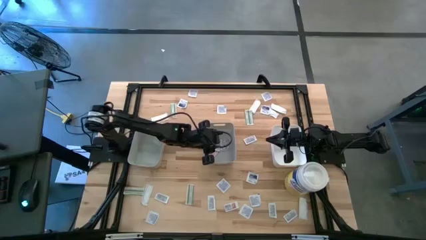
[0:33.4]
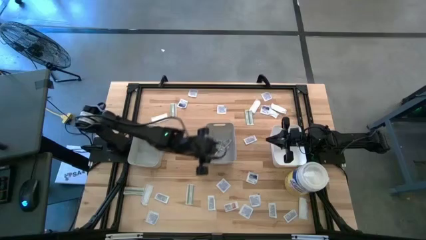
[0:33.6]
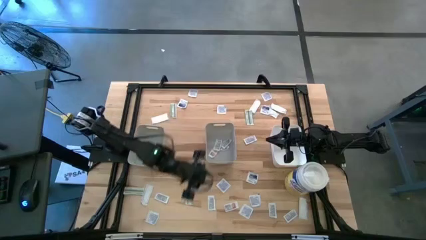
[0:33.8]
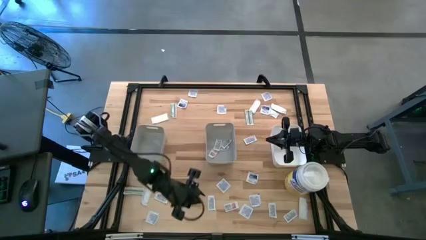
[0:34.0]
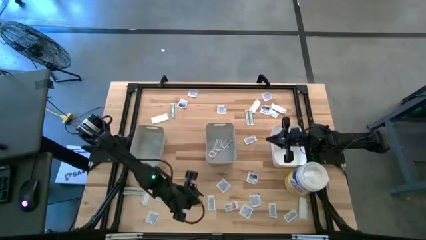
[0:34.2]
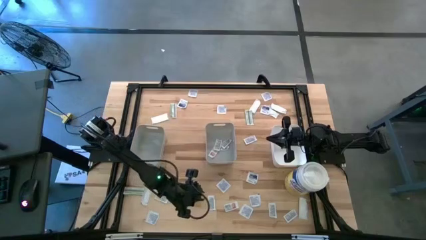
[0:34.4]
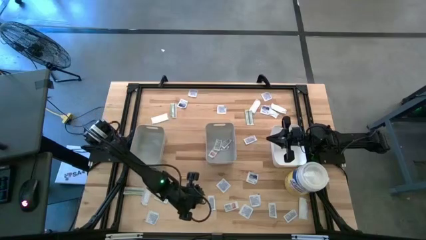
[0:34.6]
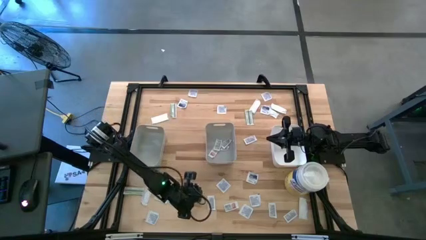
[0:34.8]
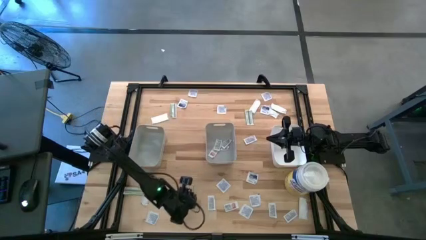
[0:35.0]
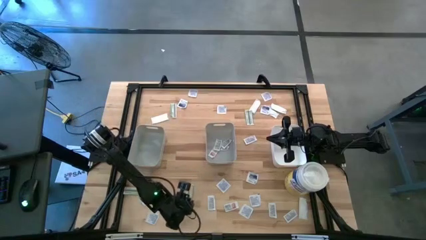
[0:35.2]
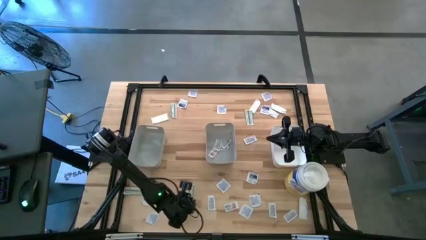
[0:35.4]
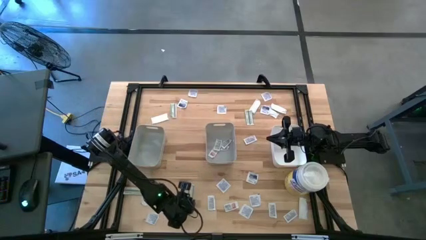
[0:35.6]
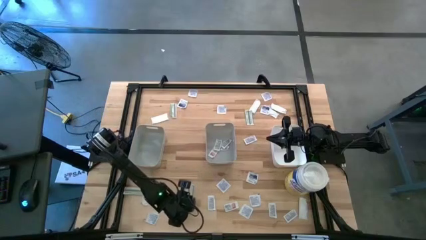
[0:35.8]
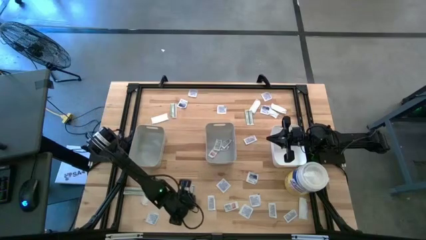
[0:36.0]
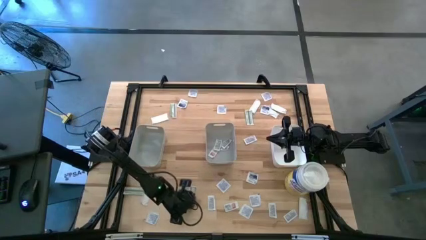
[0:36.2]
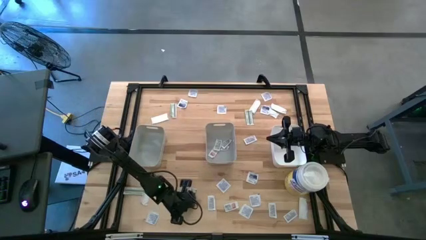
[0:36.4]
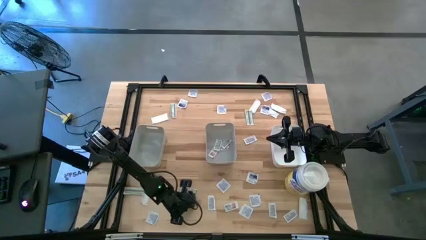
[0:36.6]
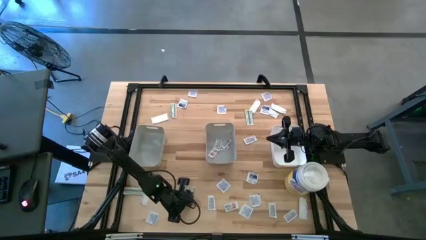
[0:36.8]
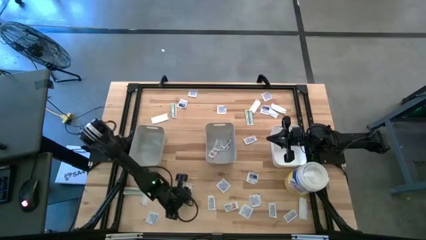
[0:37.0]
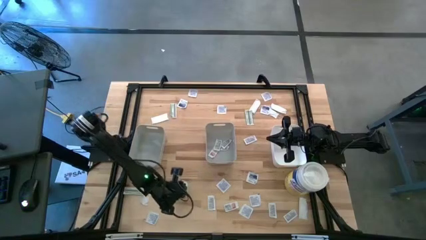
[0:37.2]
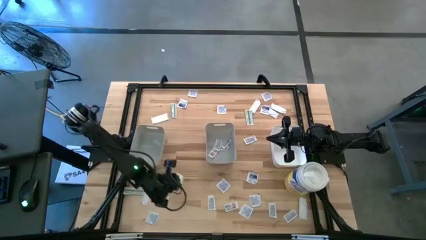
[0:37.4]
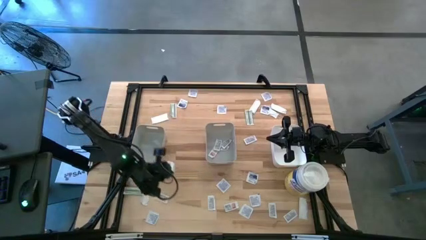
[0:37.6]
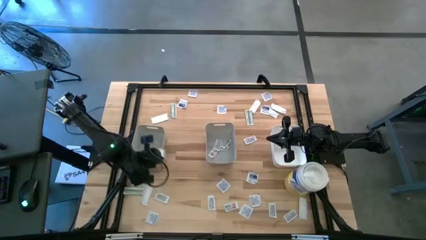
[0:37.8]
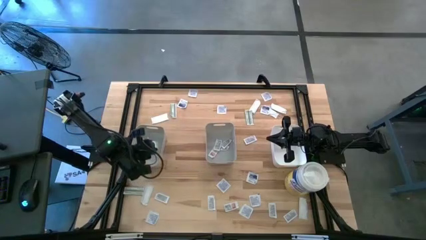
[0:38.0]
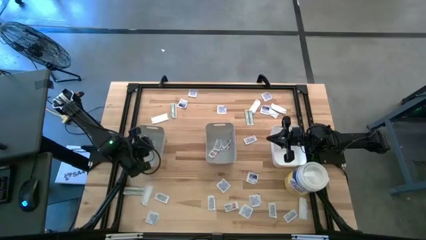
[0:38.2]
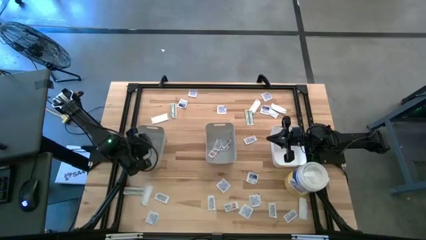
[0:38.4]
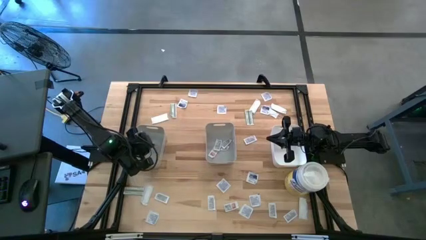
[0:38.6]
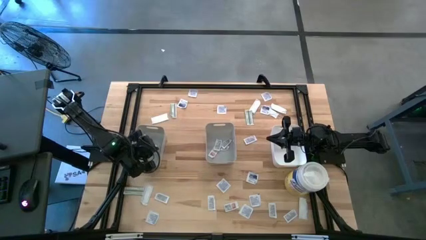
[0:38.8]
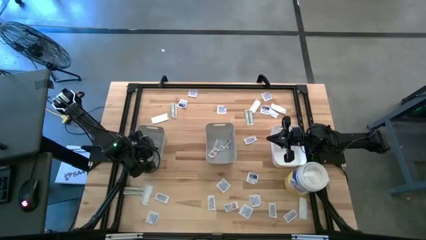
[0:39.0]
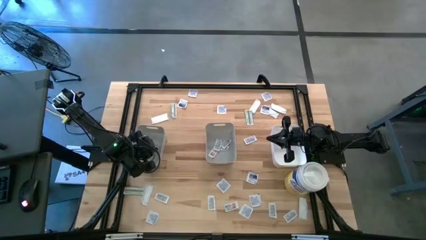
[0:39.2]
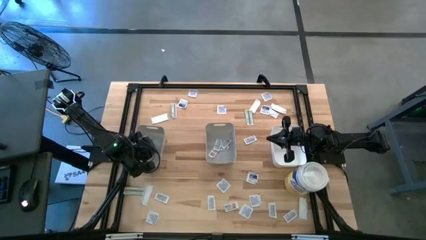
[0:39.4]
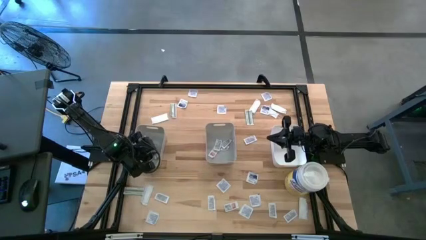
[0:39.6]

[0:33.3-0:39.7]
Task: Pick & Place First Aid Supplies
Put the bandage pack into the left gray bin

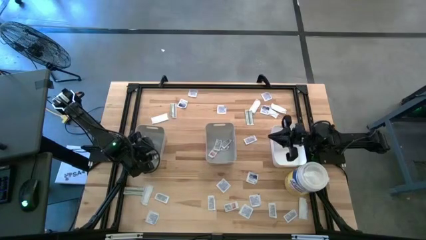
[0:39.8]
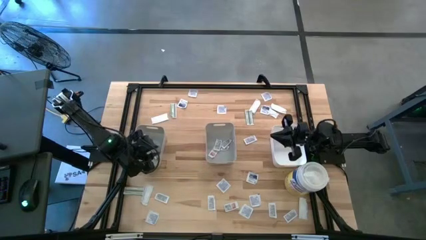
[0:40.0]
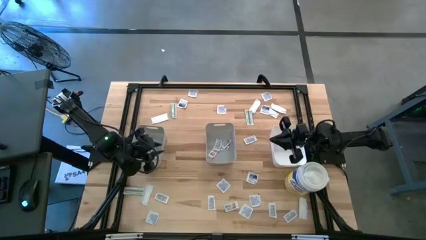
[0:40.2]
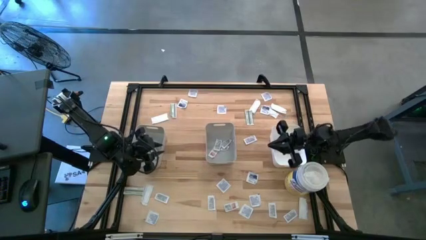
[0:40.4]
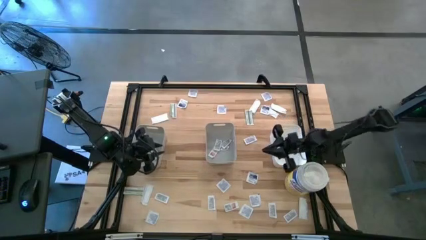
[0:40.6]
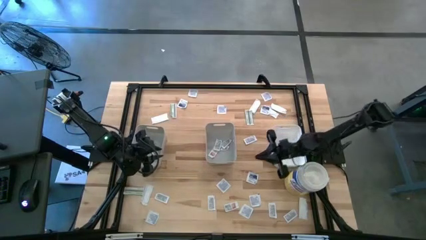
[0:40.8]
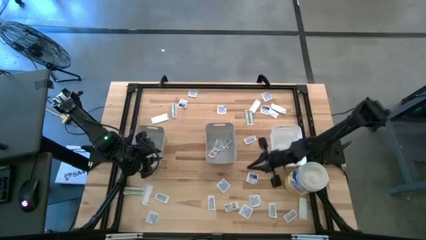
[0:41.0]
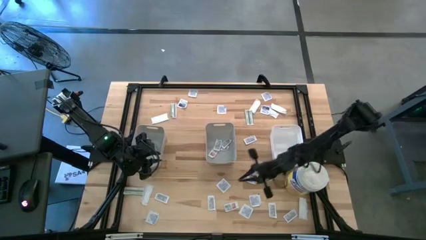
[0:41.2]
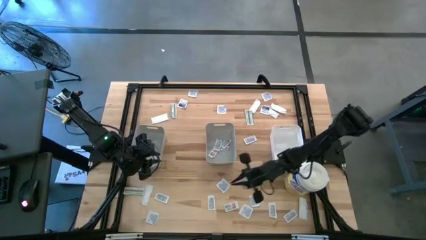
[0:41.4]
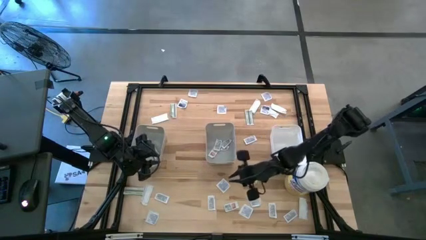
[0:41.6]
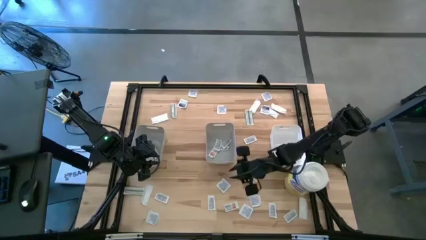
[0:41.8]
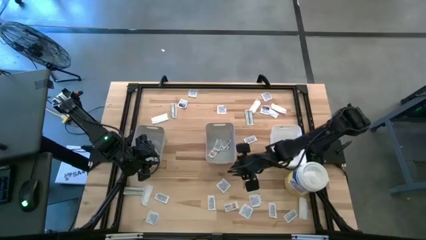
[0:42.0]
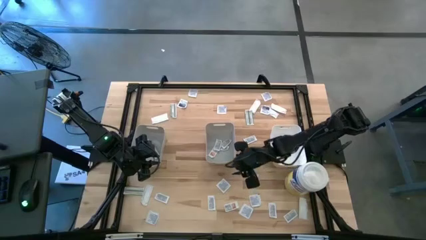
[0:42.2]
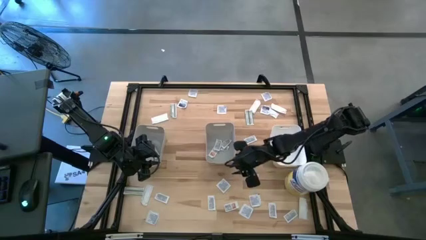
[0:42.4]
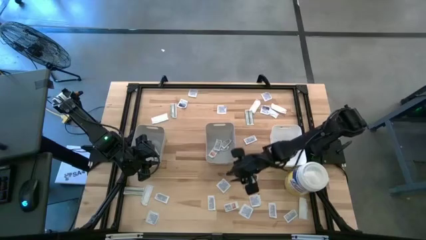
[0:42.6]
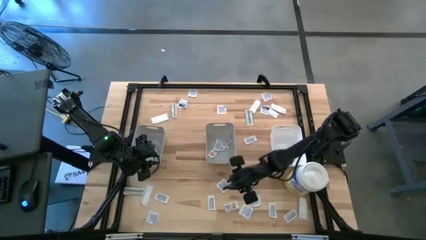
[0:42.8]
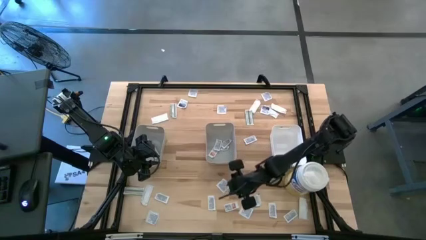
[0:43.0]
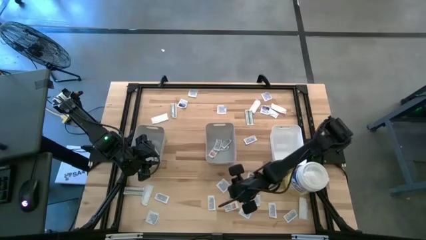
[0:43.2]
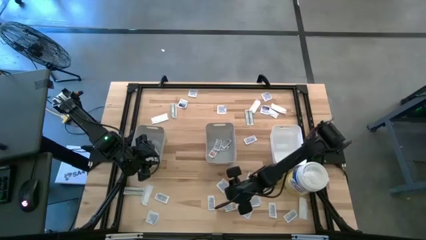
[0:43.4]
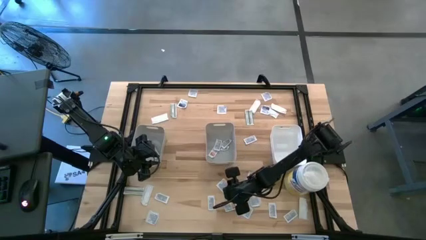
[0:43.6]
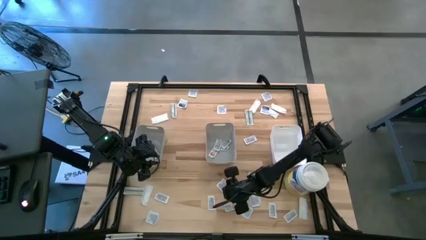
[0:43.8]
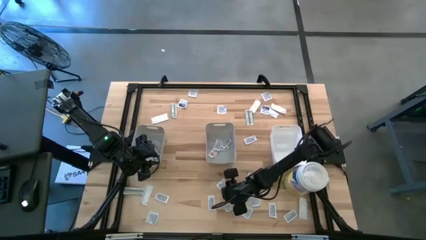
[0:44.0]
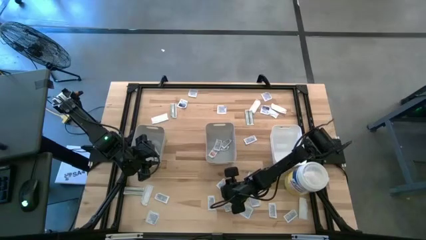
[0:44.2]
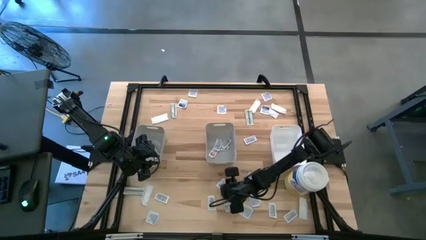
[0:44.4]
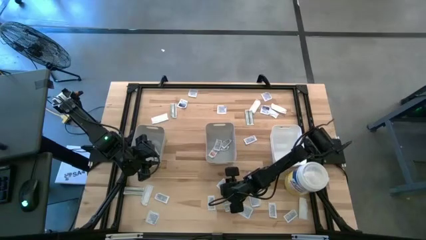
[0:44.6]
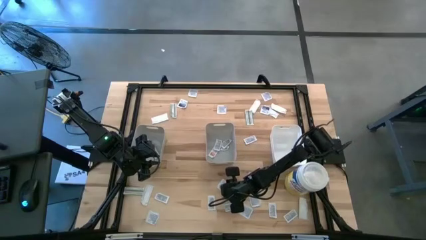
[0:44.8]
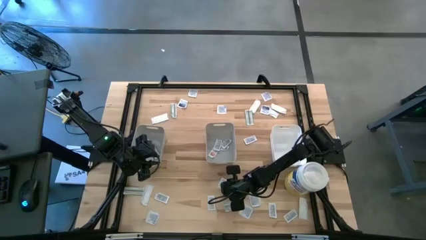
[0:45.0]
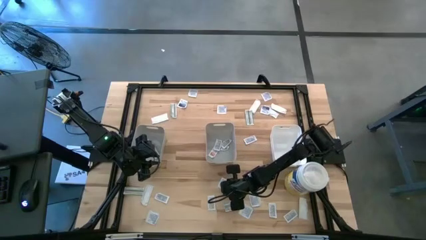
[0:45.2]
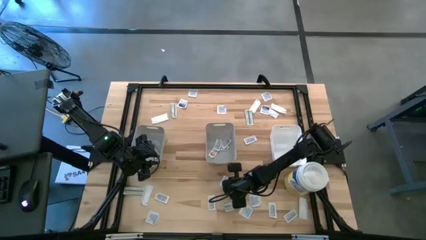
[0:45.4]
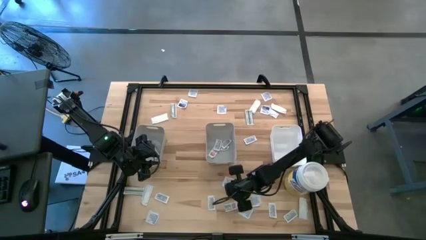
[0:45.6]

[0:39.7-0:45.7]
Put the alcohol pad into the white bin

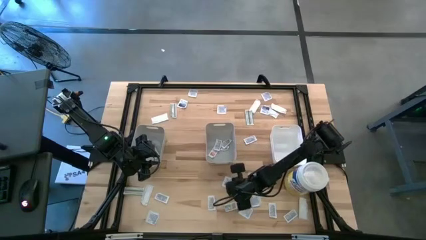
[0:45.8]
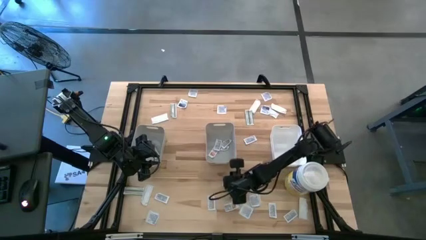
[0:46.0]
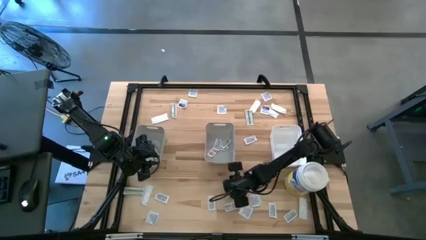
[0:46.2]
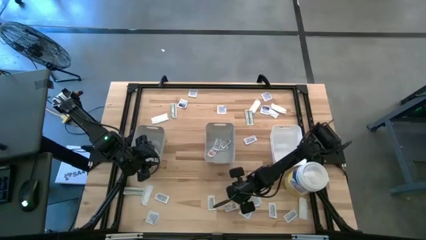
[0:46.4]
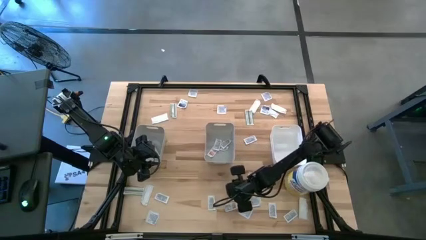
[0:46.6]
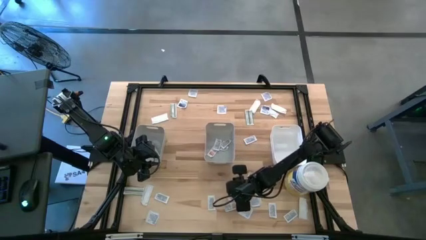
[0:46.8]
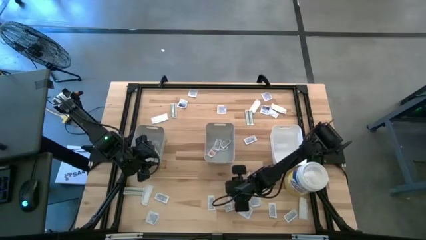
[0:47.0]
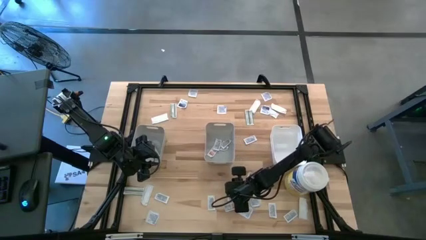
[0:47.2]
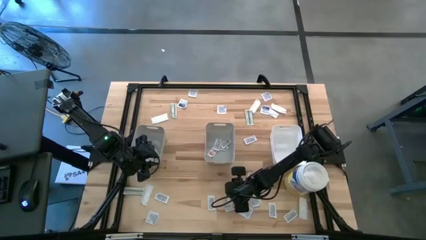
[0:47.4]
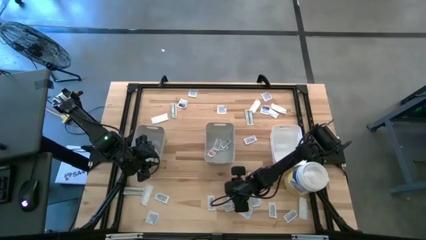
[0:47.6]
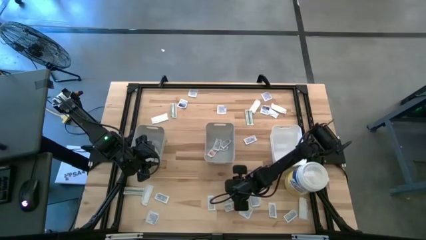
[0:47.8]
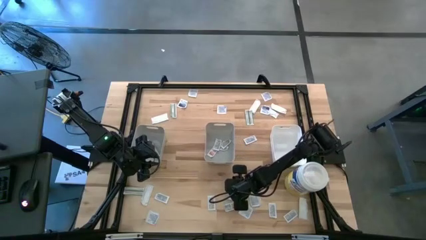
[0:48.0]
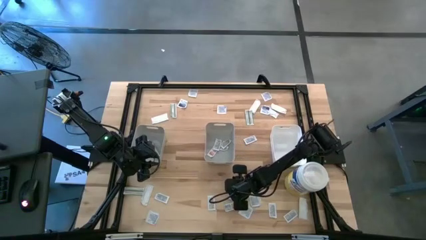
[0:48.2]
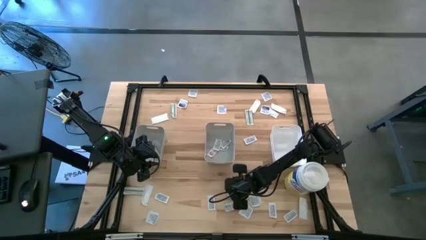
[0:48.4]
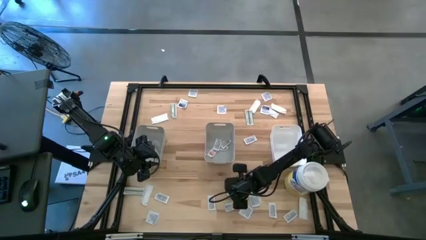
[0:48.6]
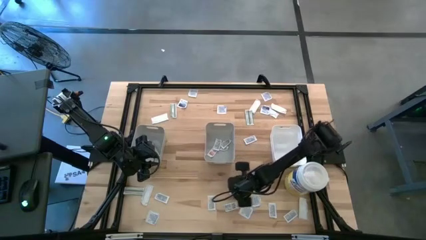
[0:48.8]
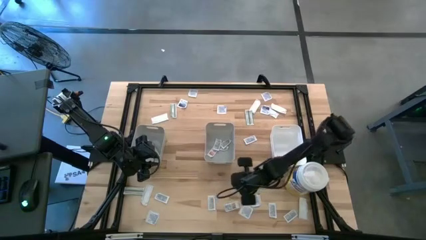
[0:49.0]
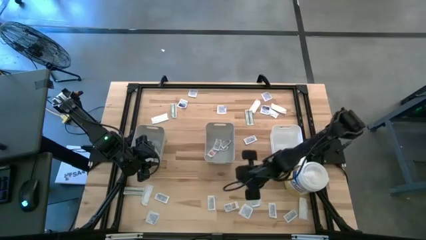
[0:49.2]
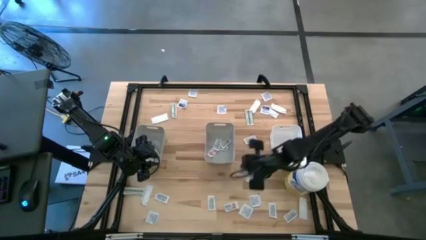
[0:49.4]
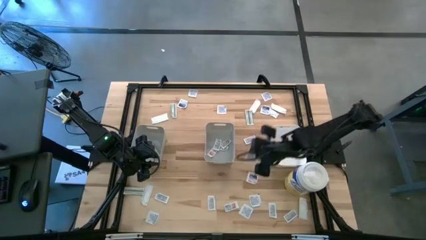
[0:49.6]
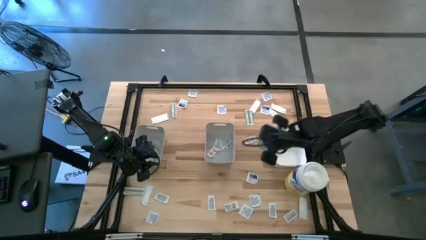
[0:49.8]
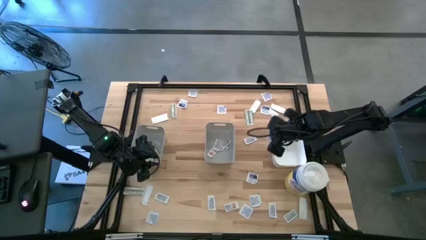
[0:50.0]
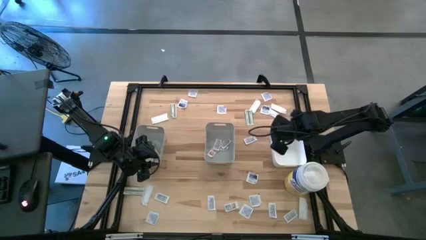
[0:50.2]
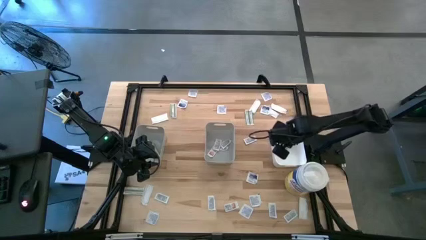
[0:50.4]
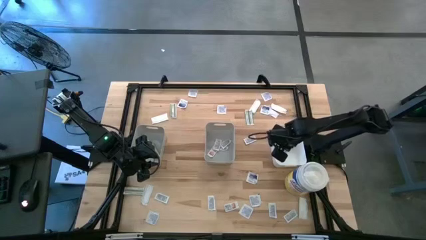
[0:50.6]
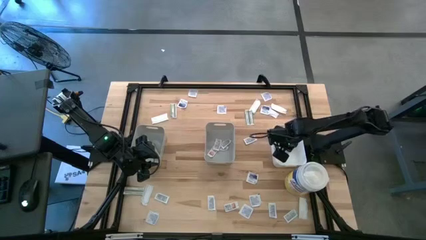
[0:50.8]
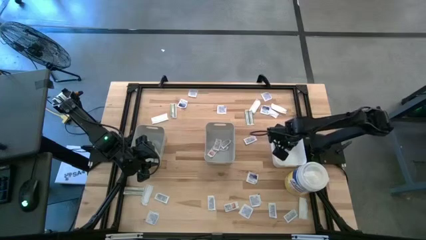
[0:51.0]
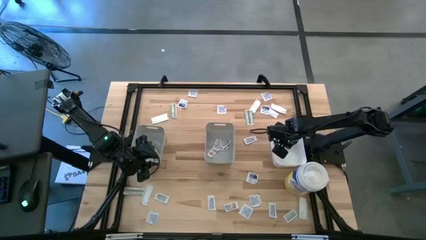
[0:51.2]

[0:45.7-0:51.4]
Put the alcohol pad into the white bin
